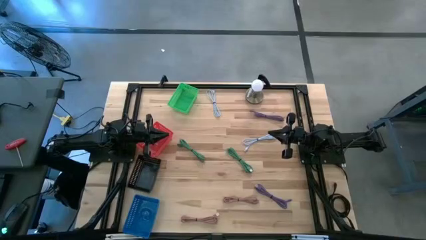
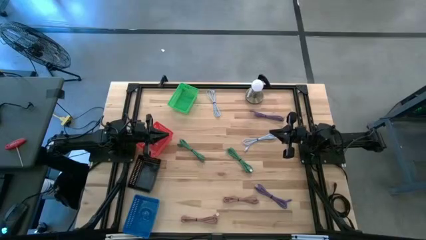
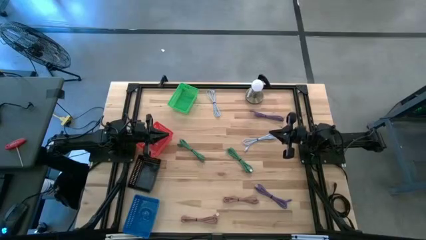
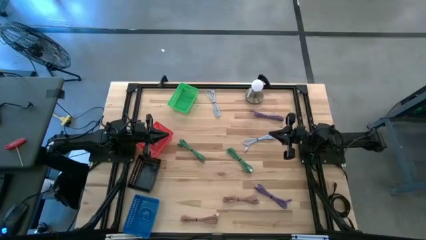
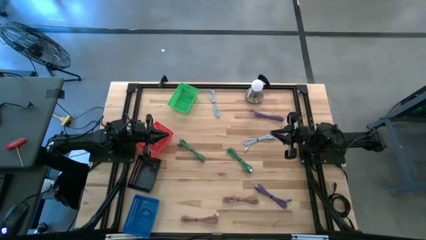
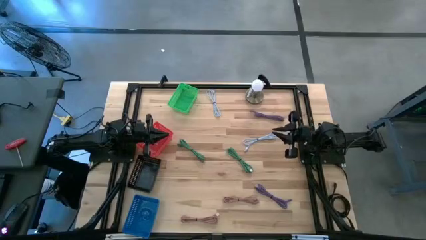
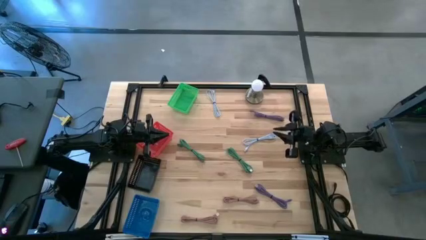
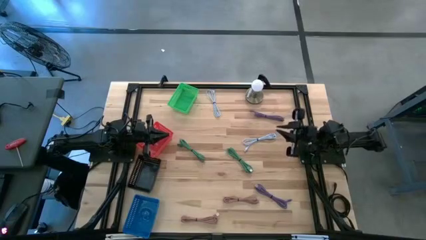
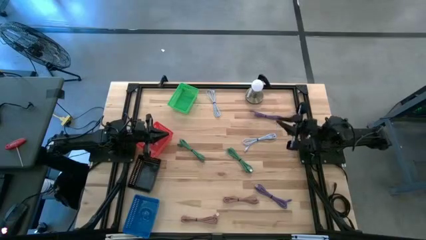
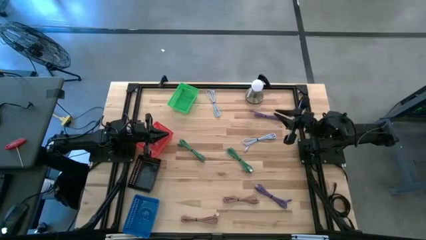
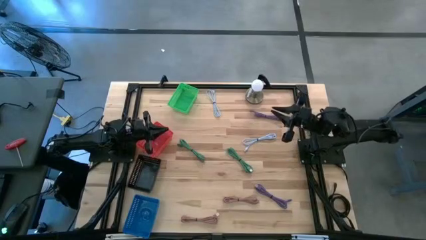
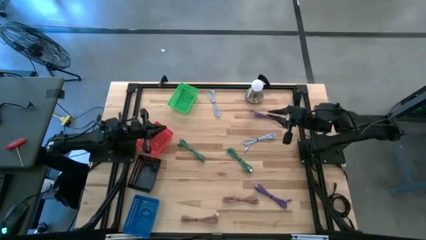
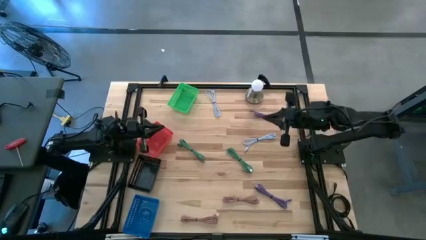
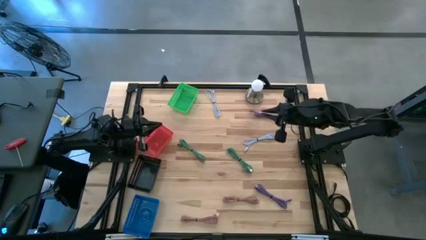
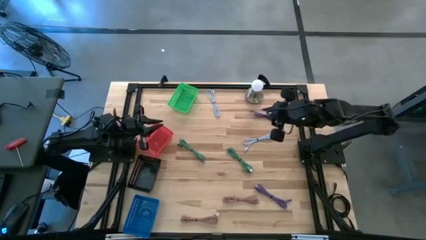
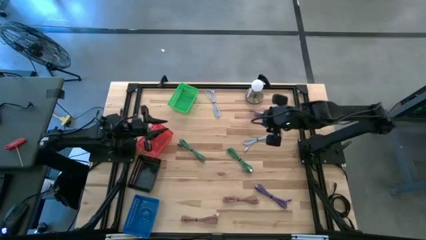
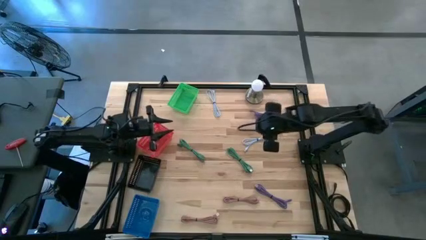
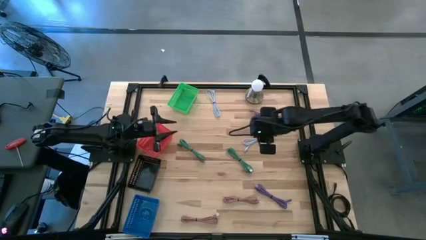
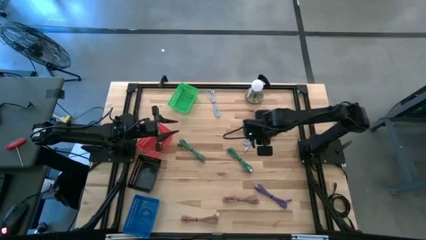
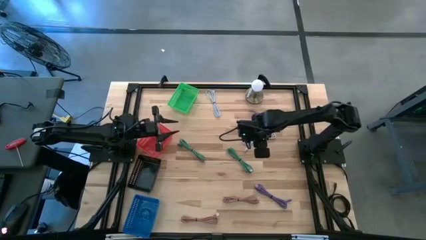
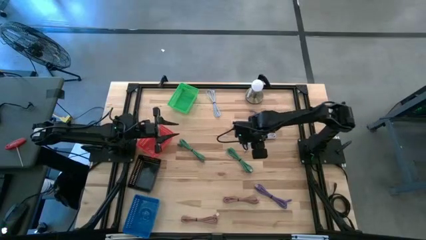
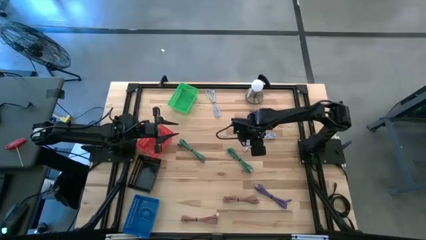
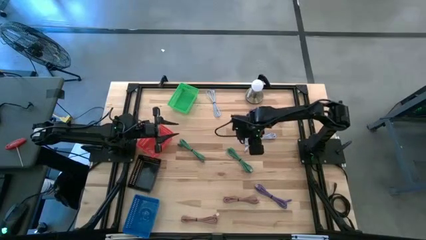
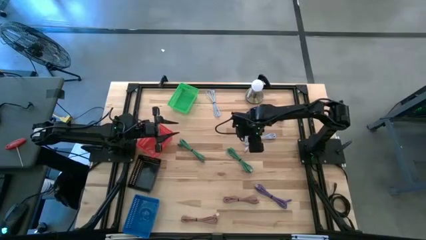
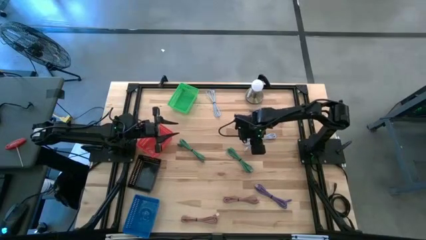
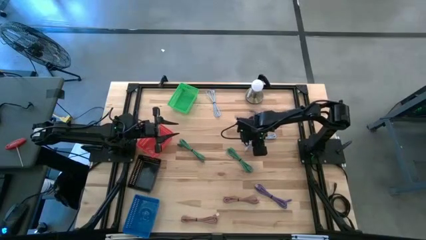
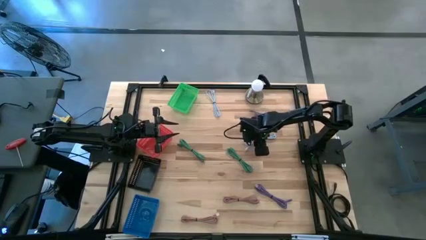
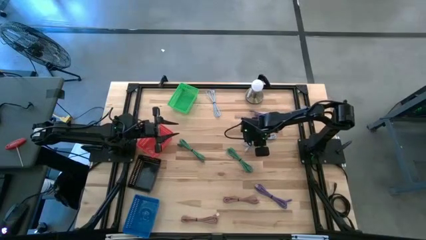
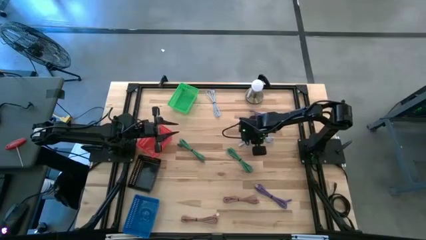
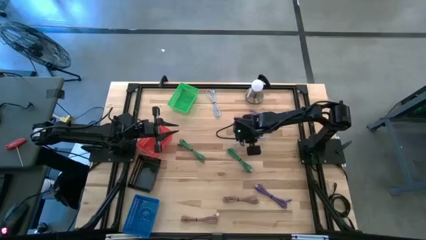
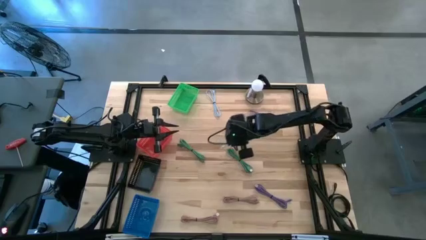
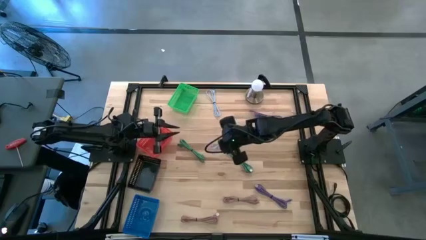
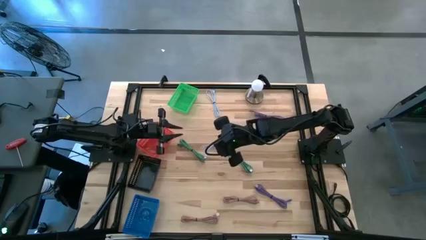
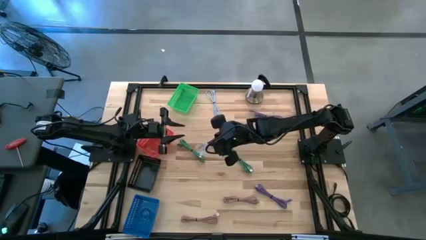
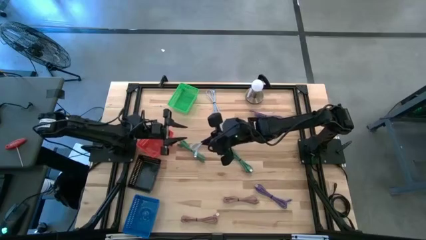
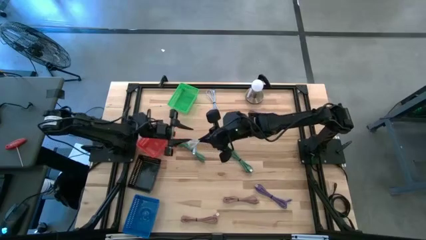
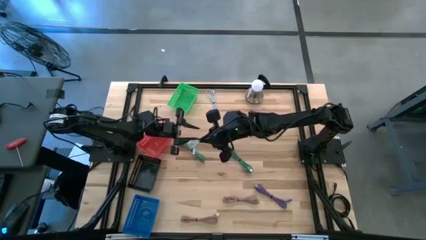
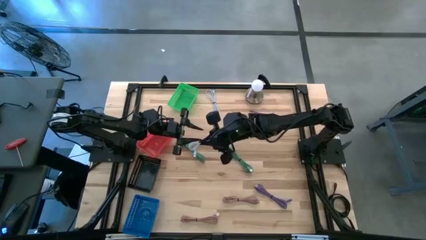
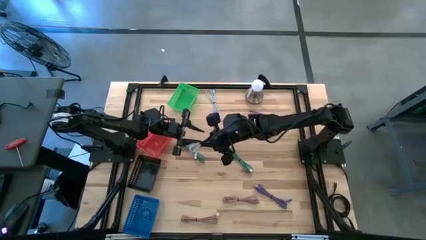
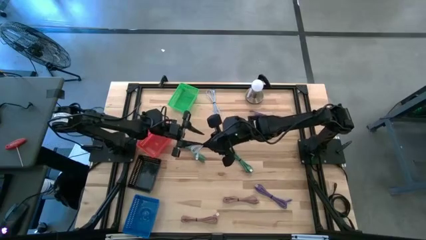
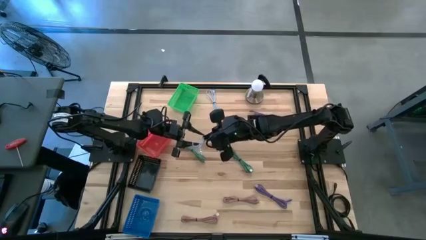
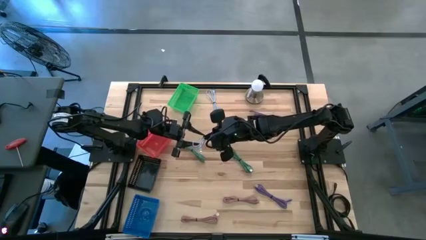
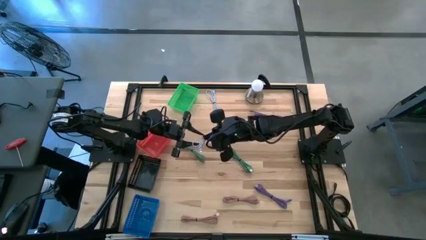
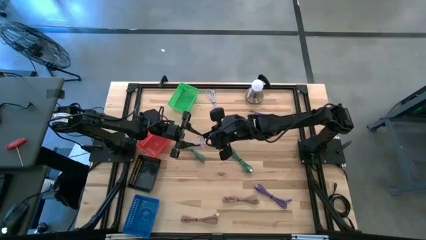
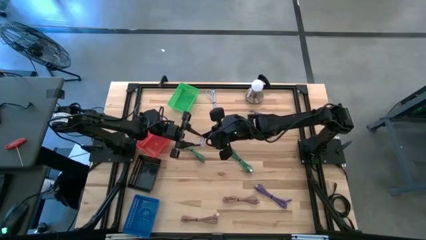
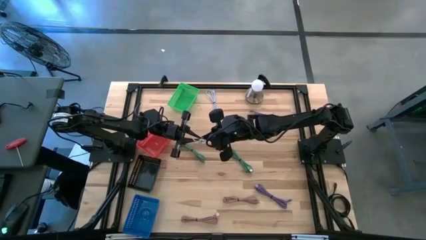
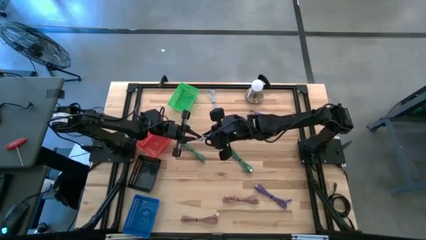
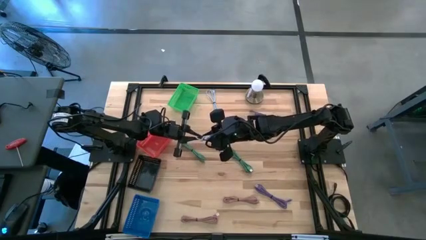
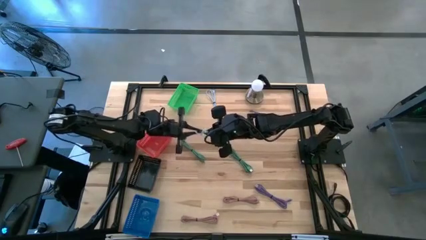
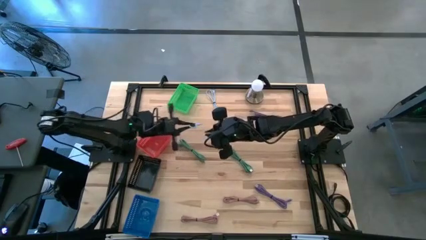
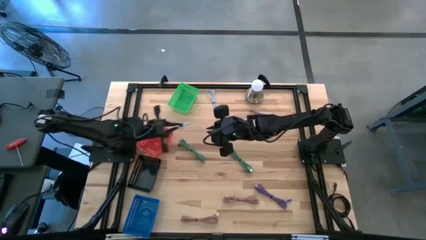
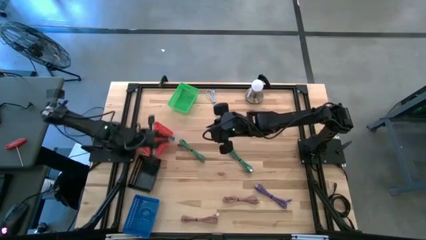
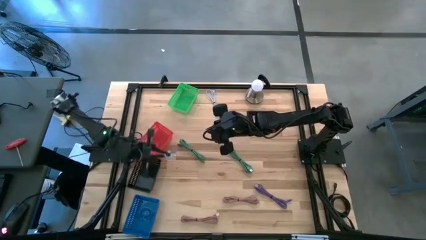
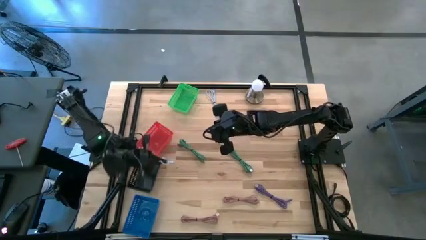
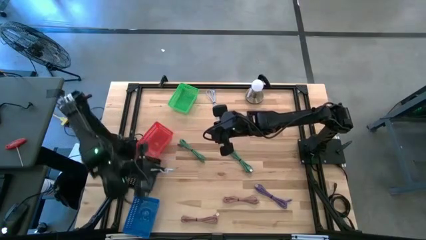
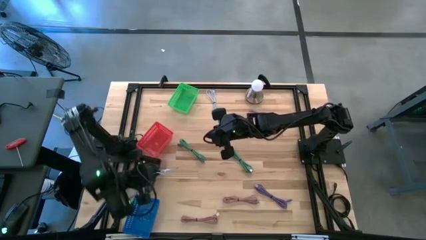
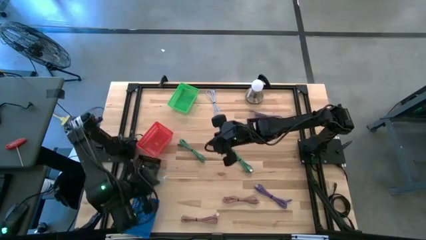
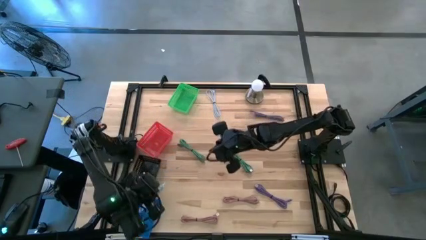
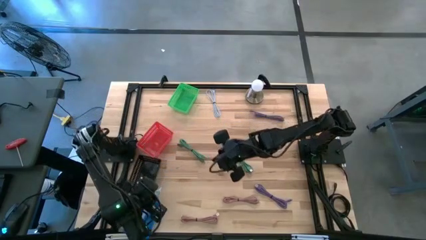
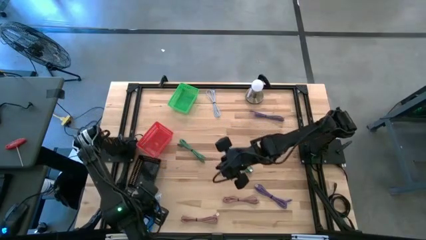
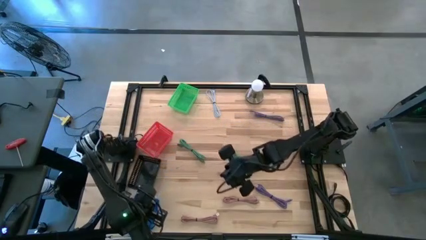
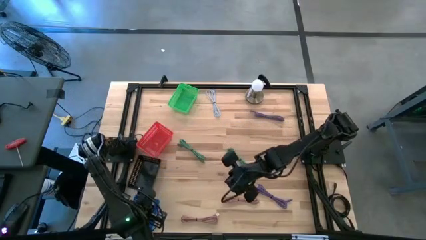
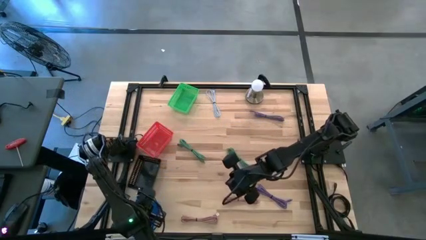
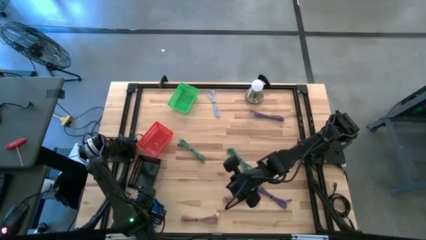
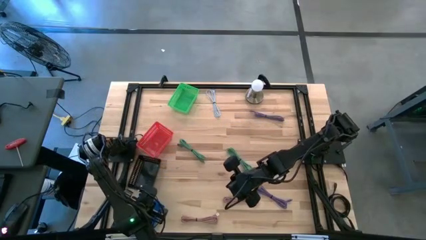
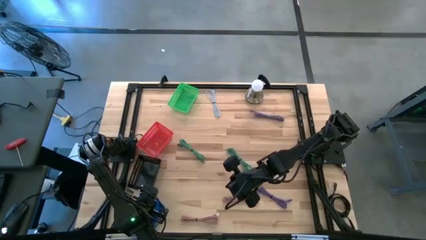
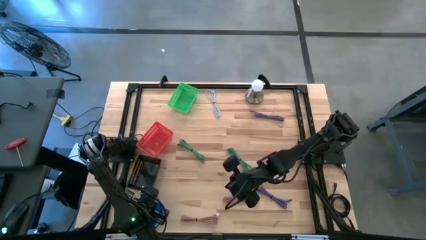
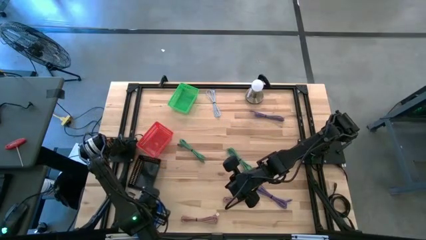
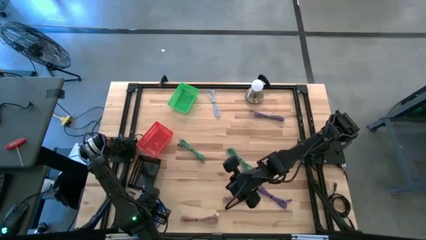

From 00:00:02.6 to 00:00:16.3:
Task: Pick & Place USB Port
Put the bottom light blue charger cable into the blue bin
